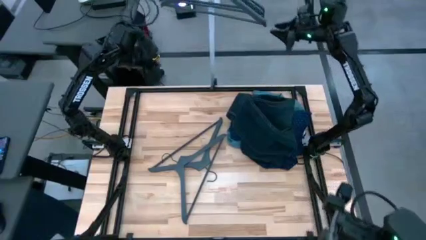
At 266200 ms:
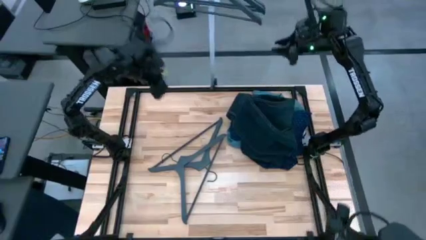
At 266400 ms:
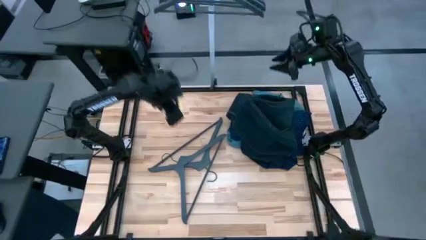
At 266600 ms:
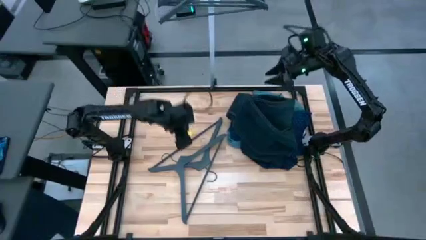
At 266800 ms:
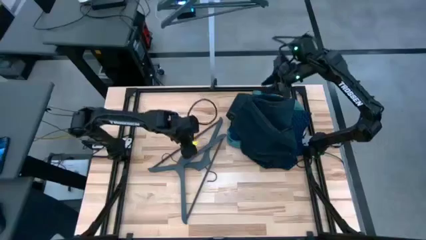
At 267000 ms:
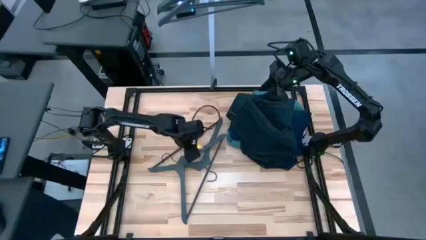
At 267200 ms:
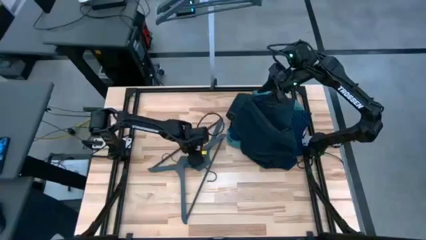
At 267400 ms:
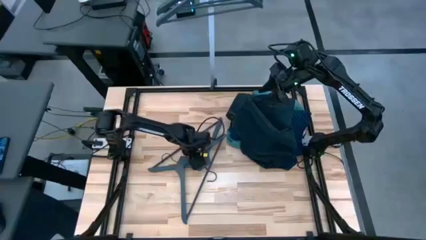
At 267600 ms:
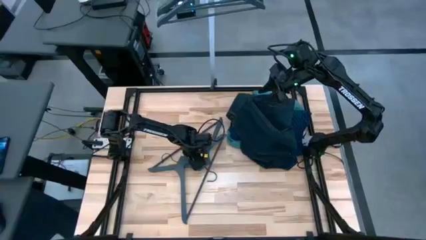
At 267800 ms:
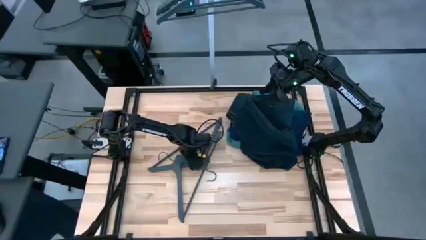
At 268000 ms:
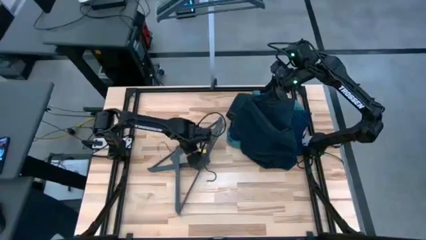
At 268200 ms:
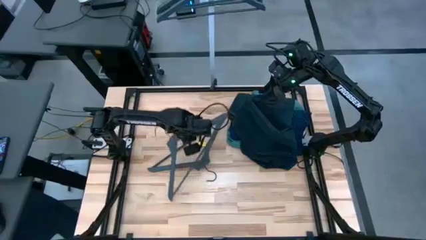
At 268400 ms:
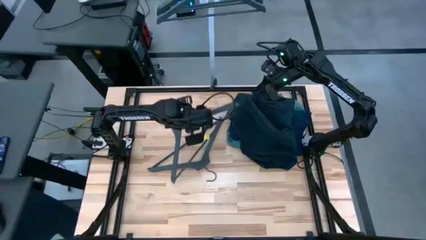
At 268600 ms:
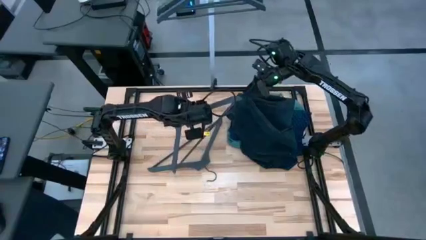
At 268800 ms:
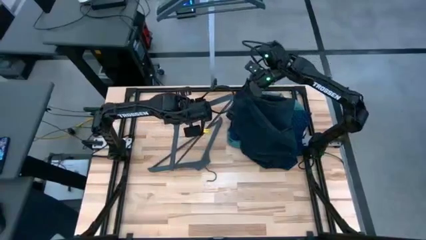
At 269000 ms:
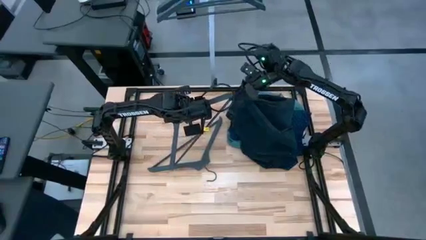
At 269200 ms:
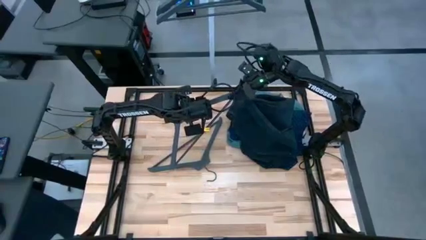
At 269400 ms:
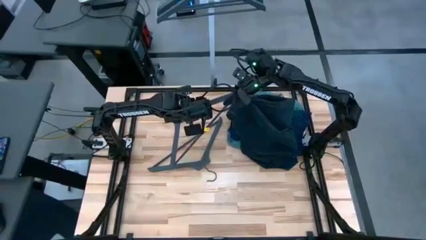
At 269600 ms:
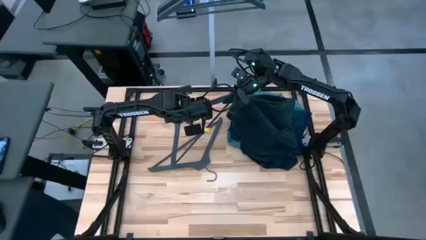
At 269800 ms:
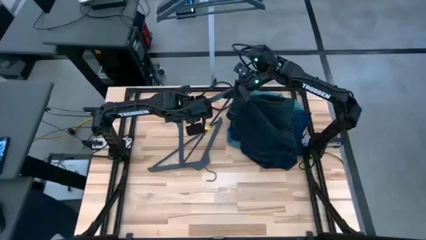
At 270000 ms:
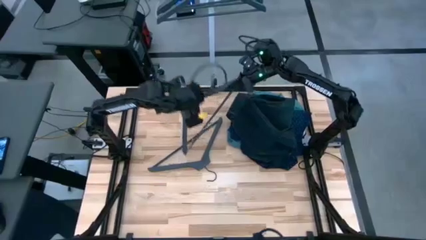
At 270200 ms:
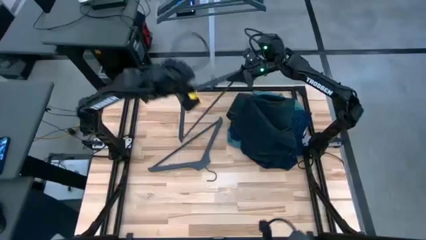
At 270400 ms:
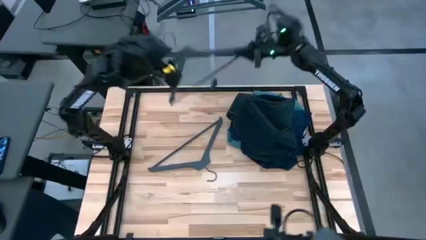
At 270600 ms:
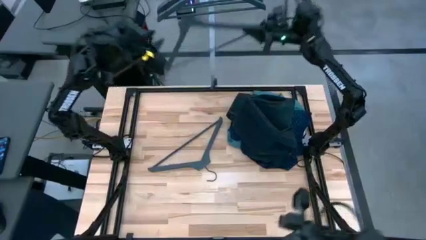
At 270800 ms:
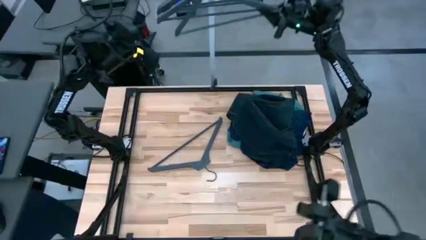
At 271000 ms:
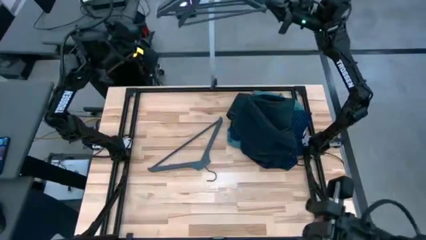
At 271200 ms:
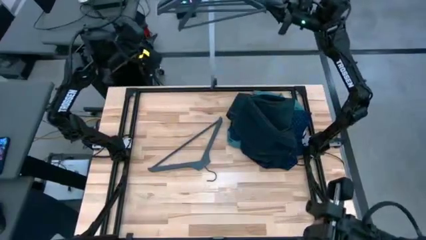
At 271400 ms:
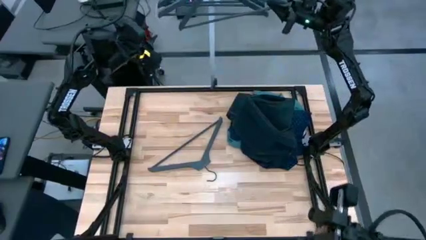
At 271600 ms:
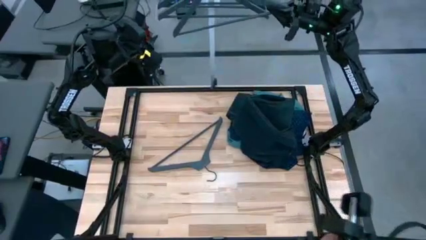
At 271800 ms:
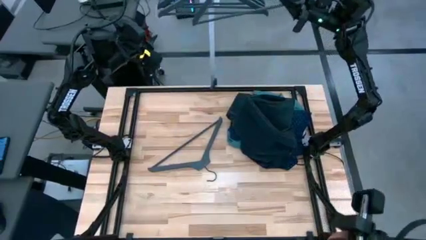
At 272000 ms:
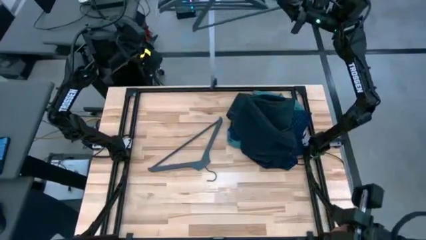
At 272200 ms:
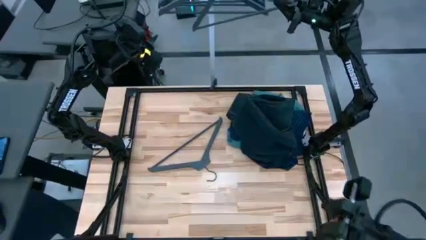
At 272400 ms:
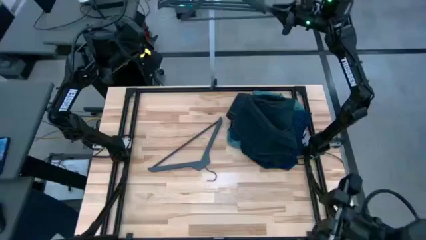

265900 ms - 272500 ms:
Task: Hang clothes
Hang the gray hanger on the rack

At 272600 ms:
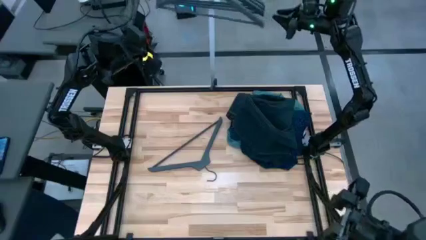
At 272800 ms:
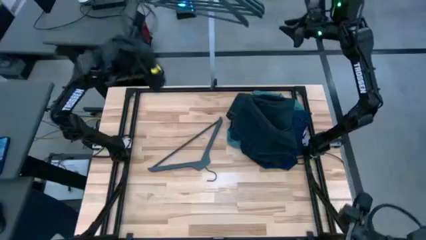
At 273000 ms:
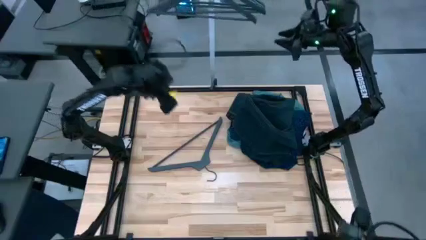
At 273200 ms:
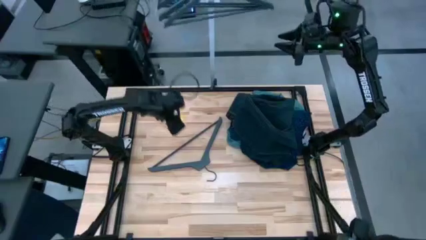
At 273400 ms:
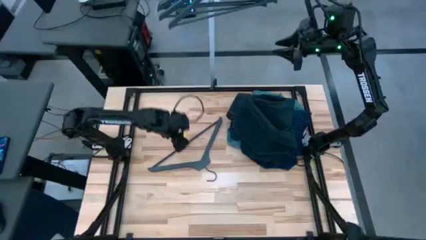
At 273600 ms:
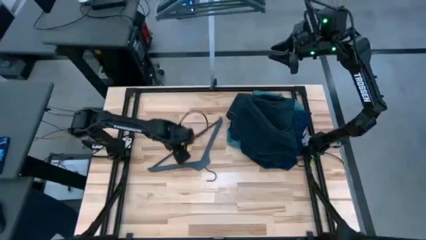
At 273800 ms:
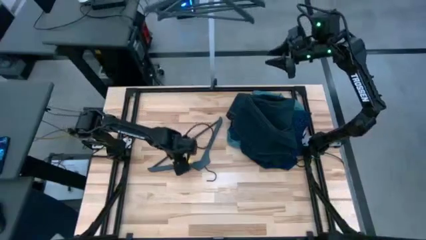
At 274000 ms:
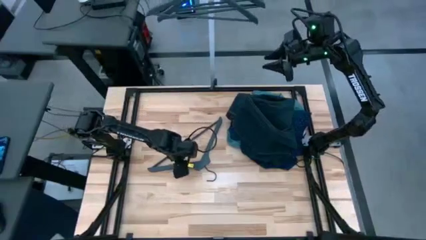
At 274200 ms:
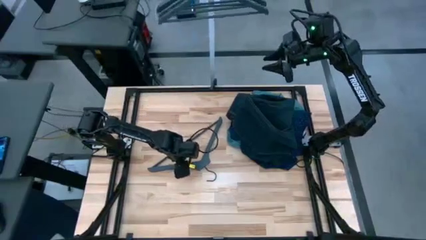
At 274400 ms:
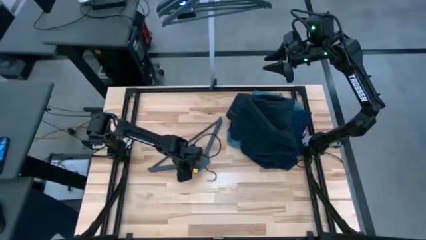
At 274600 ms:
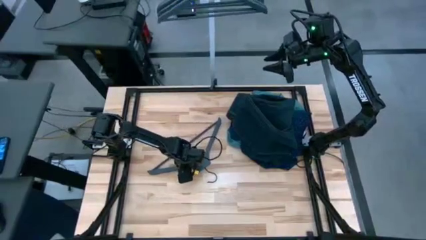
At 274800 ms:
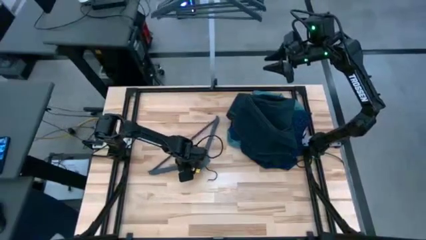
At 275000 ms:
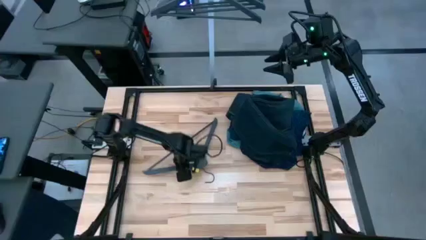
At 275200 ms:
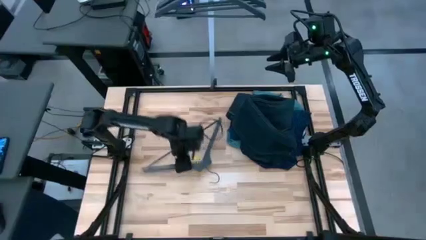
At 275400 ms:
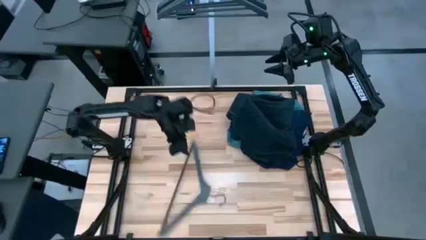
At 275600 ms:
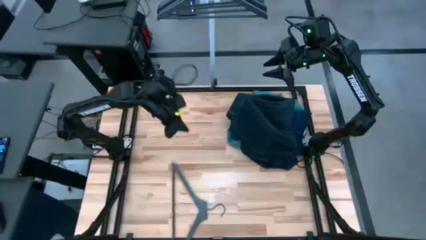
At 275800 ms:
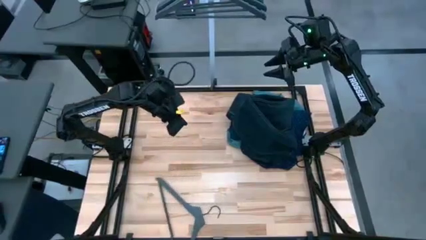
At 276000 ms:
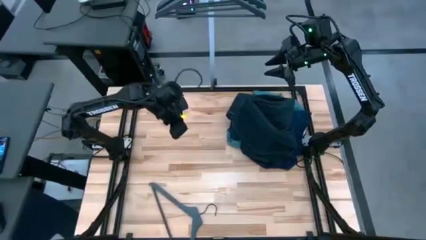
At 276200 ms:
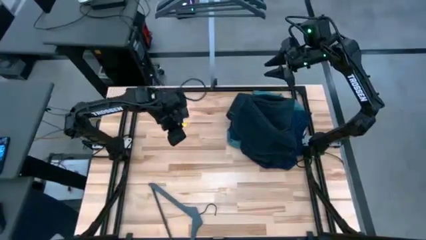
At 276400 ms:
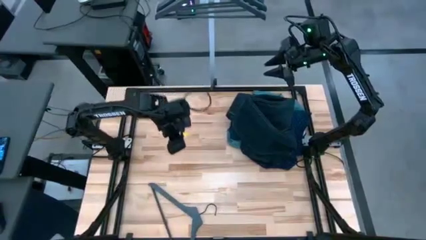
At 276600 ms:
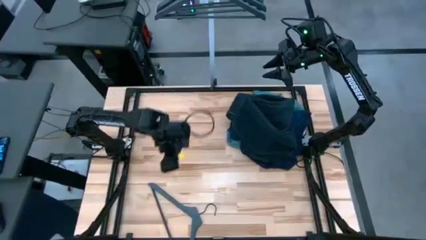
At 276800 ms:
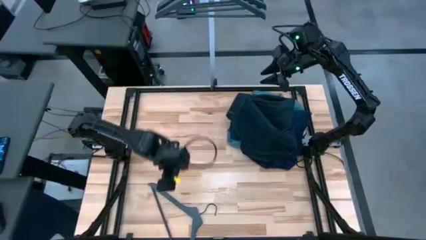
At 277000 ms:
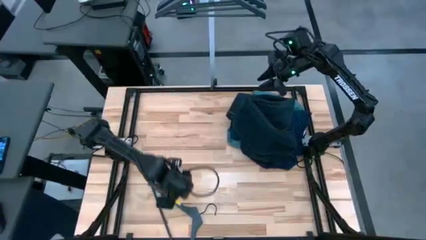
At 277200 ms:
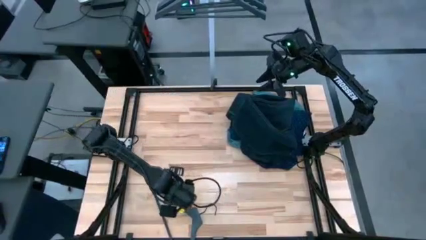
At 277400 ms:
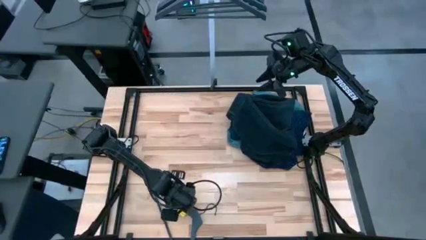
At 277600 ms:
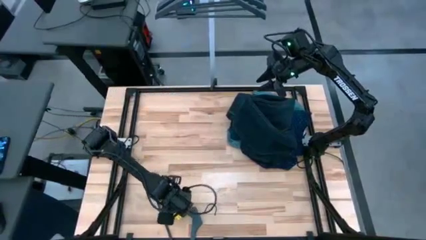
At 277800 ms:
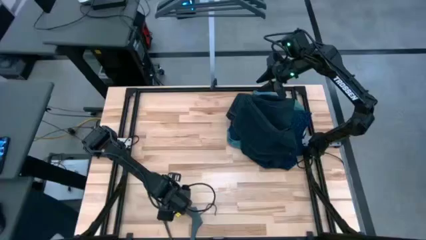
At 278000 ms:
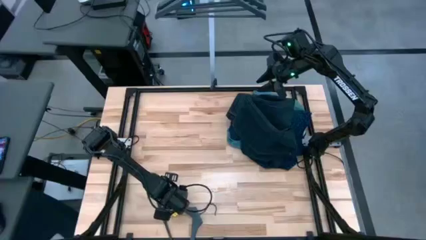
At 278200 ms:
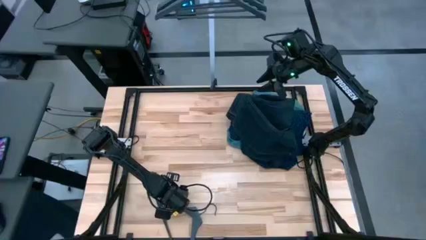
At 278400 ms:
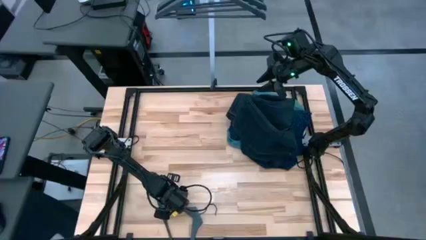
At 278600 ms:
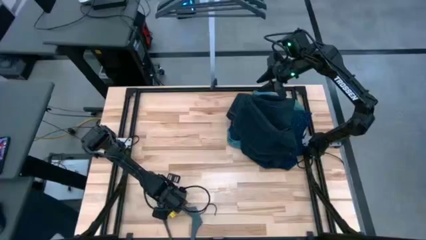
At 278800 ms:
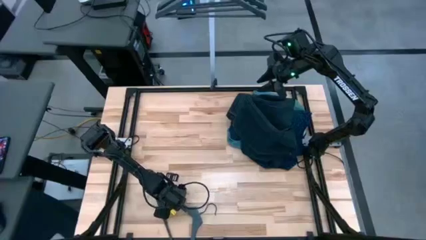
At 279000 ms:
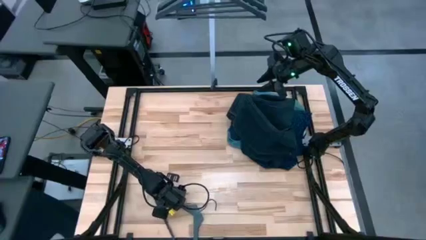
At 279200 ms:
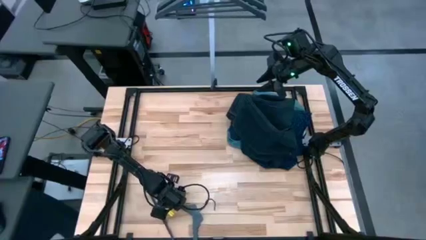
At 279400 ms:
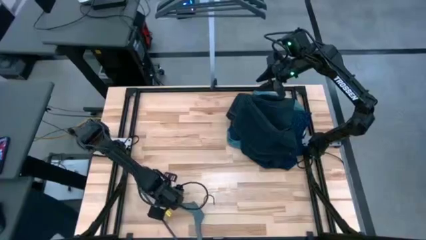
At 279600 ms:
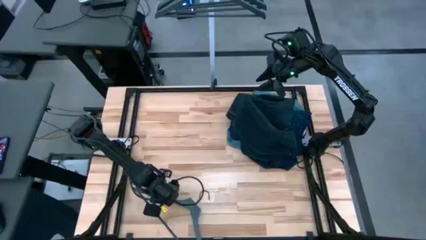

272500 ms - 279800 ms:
Hang the gray hanger on the rack

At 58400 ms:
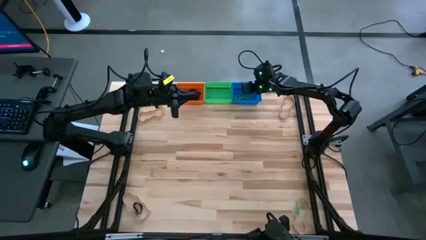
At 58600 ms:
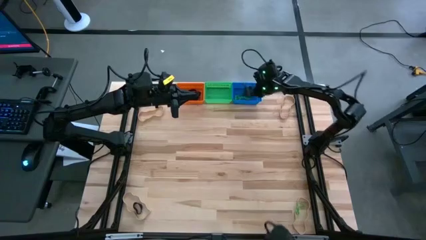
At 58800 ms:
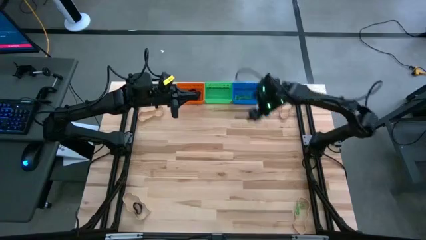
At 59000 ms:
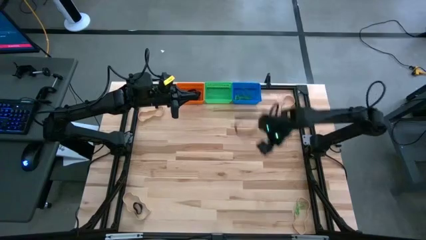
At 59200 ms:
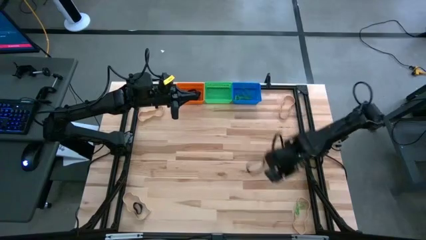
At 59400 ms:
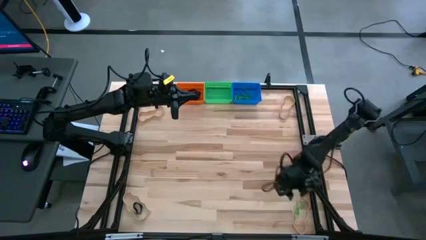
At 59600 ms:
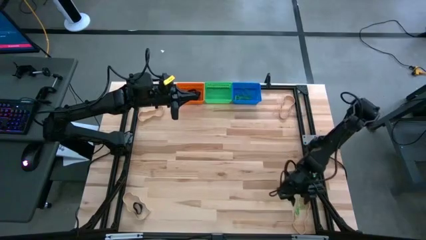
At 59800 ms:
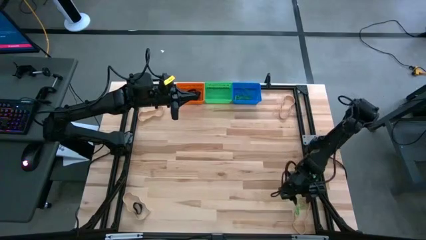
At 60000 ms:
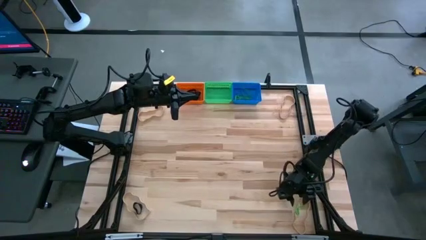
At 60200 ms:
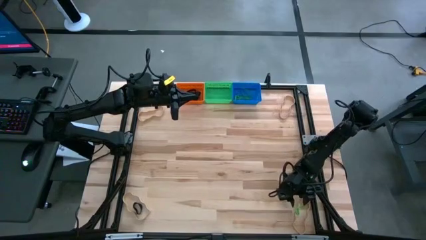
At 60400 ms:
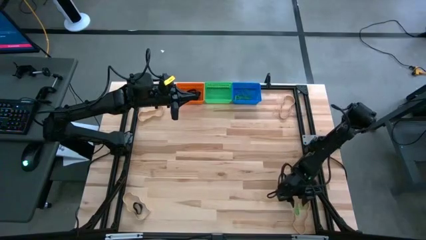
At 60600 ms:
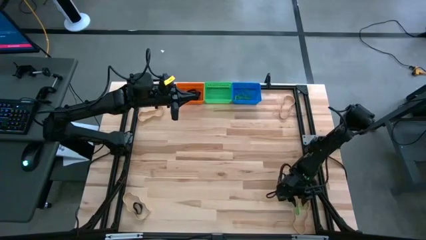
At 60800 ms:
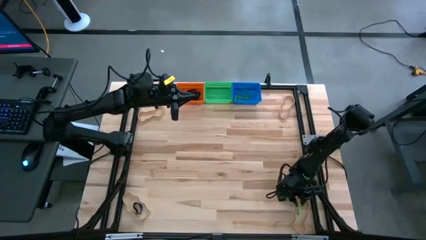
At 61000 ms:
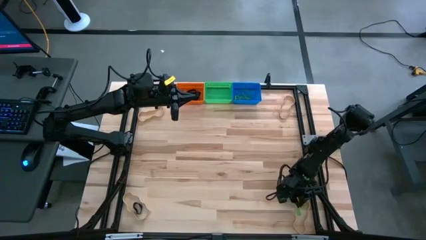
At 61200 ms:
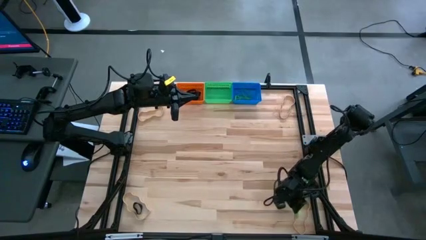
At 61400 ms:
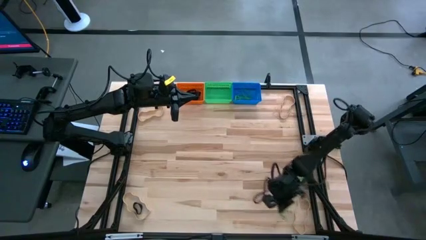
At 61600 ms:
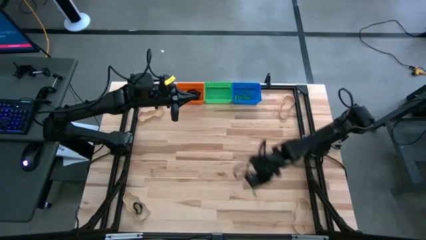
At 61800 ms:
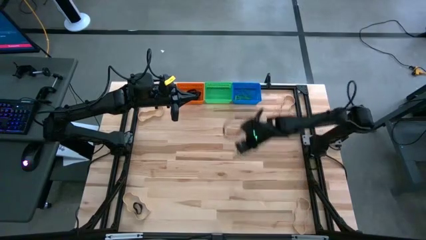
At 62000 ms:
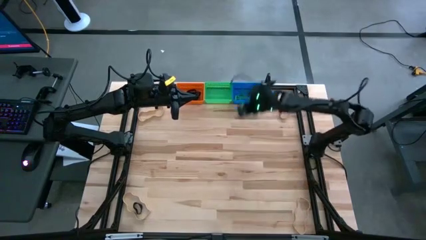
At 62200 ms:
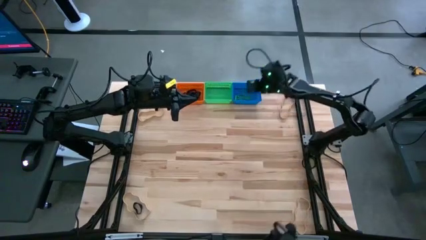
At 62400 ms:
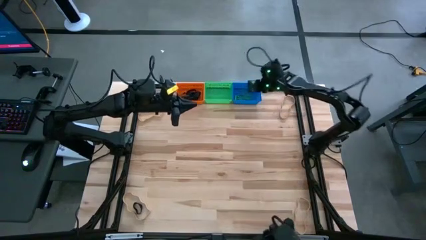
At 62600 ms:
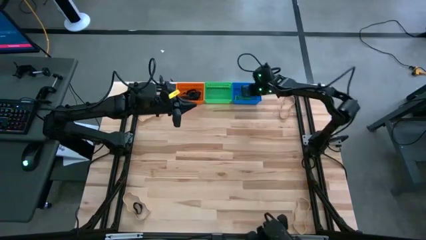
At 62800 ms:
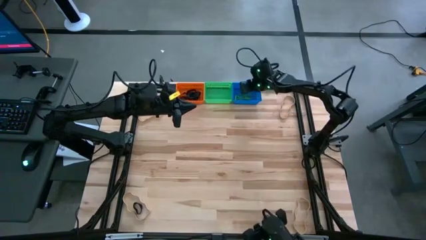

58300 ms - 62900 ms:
Task: Sort rubber bands into baskets
Put the green rubber band into the blue basket
